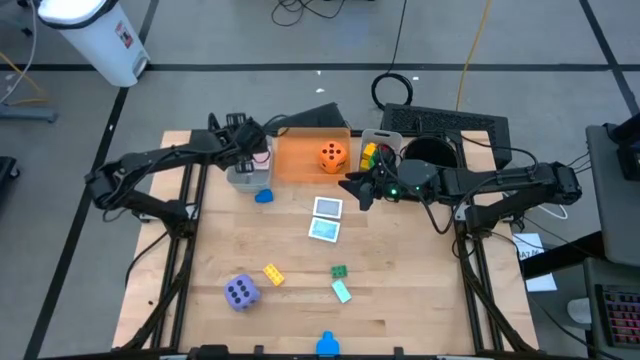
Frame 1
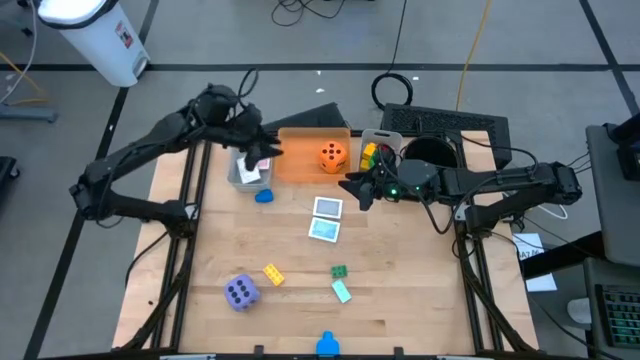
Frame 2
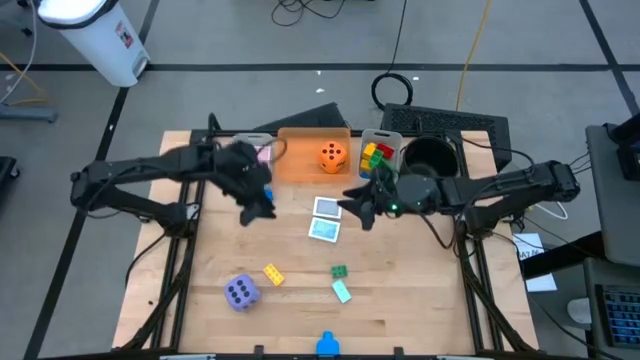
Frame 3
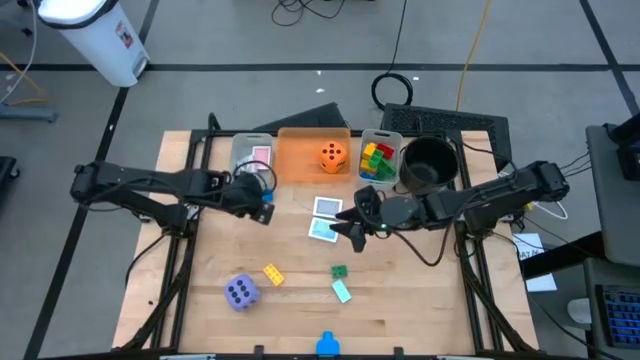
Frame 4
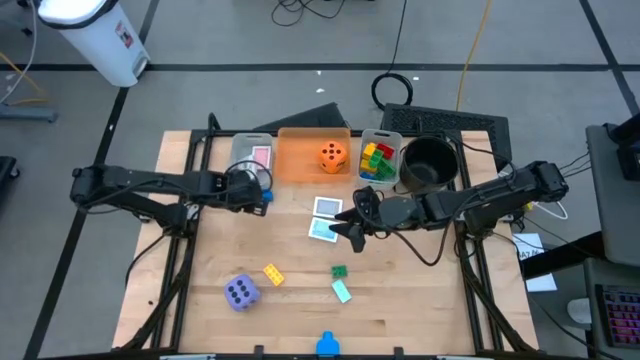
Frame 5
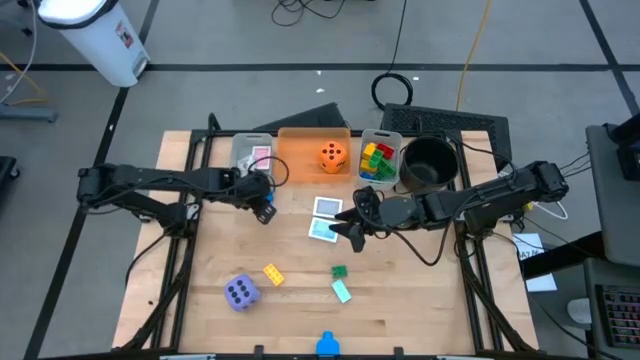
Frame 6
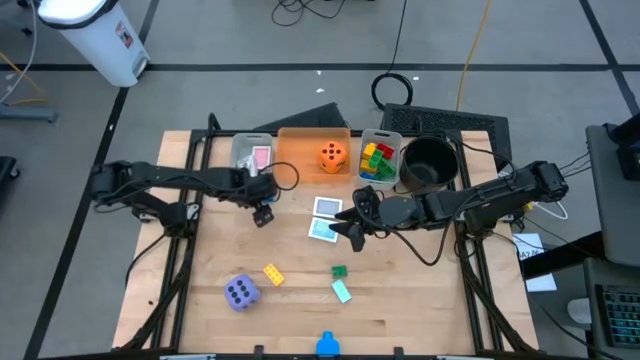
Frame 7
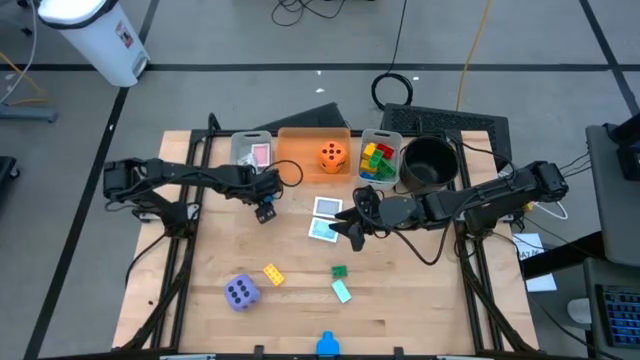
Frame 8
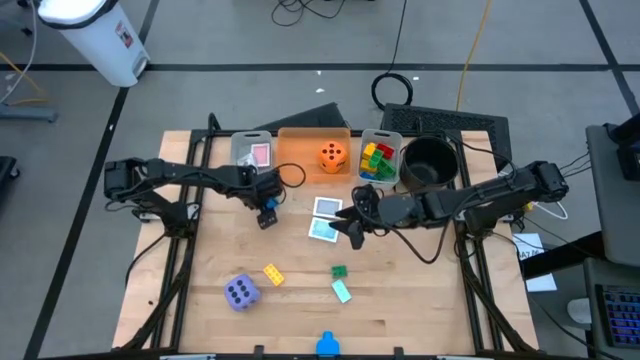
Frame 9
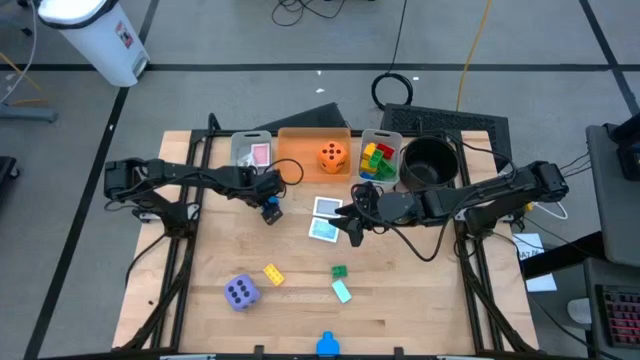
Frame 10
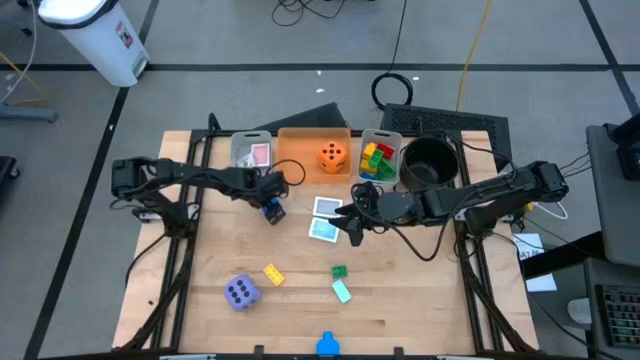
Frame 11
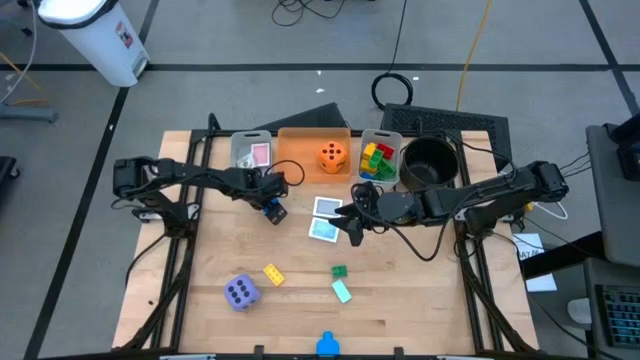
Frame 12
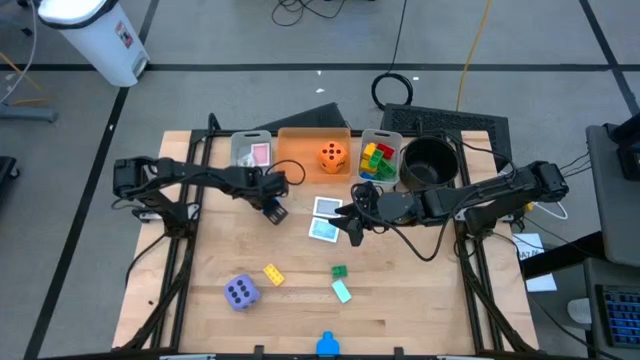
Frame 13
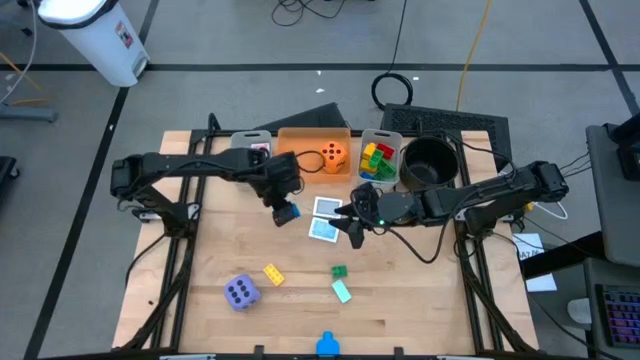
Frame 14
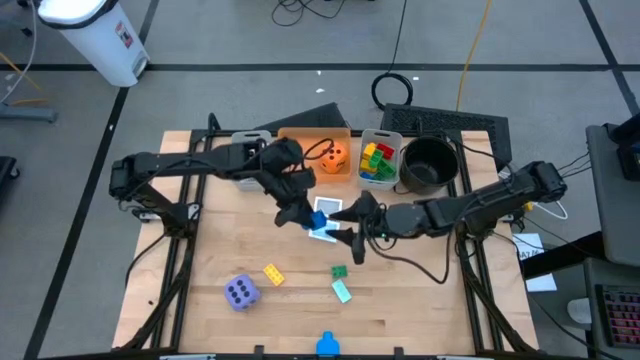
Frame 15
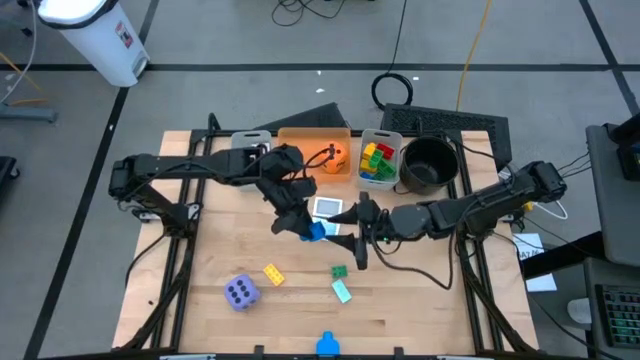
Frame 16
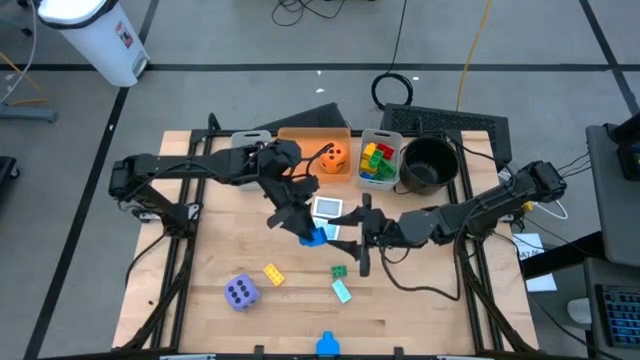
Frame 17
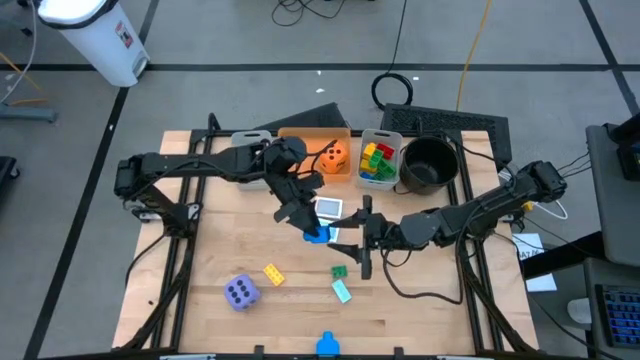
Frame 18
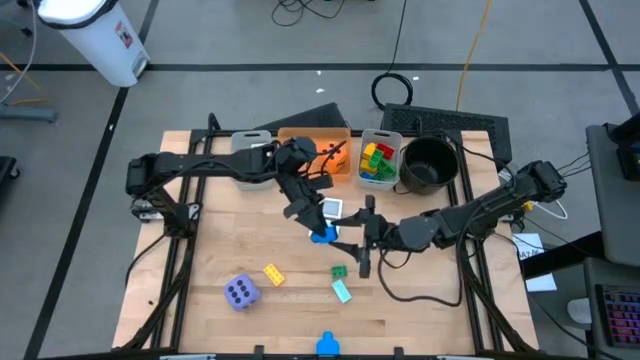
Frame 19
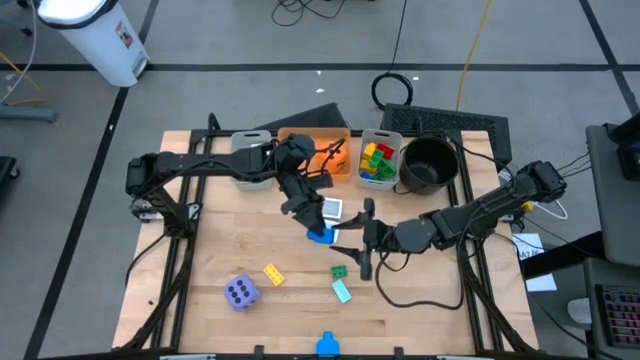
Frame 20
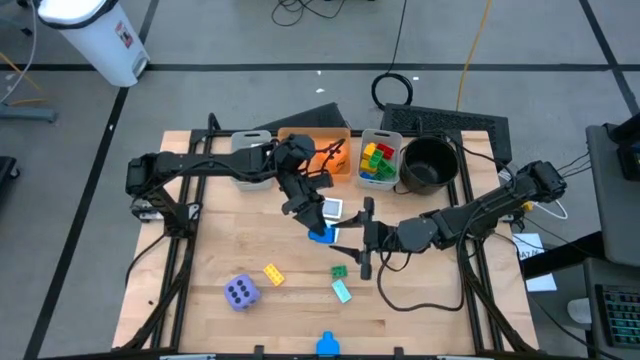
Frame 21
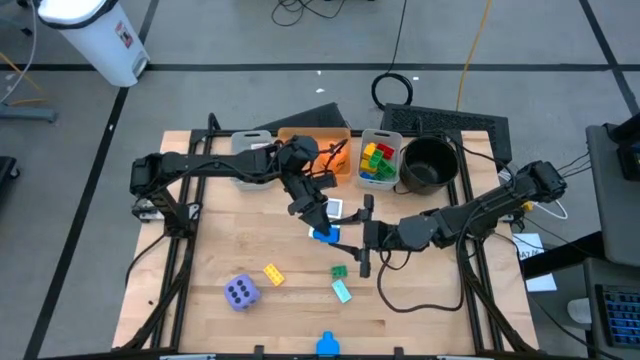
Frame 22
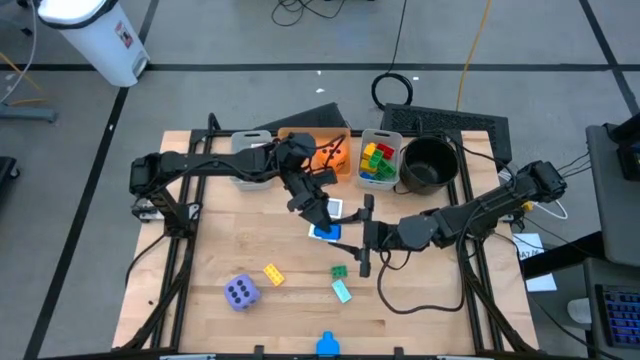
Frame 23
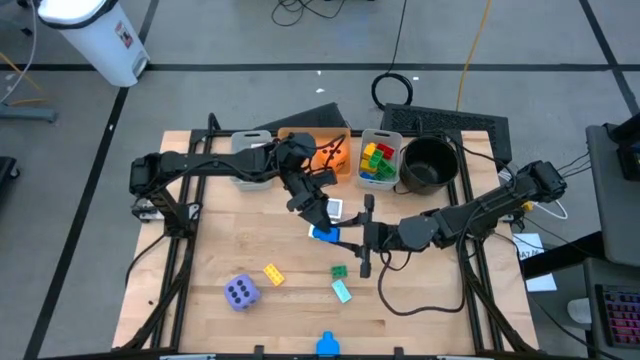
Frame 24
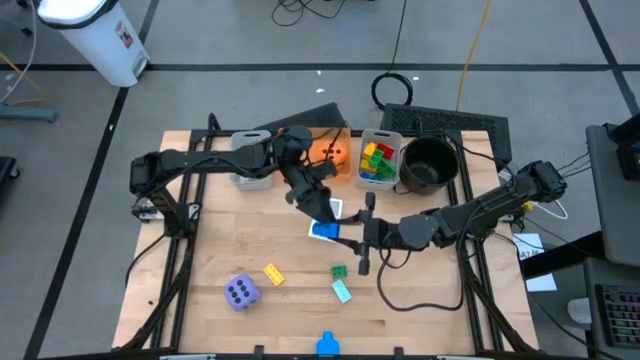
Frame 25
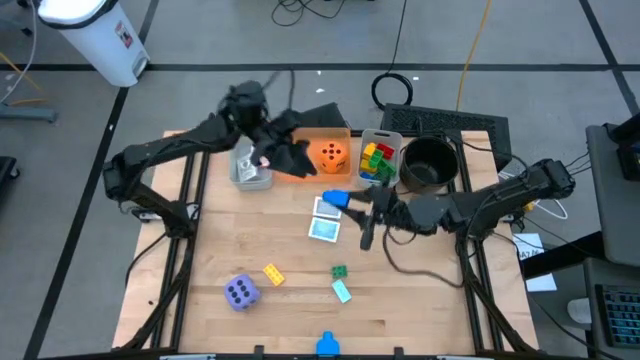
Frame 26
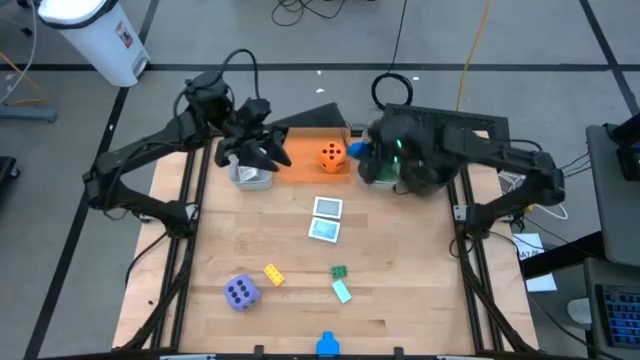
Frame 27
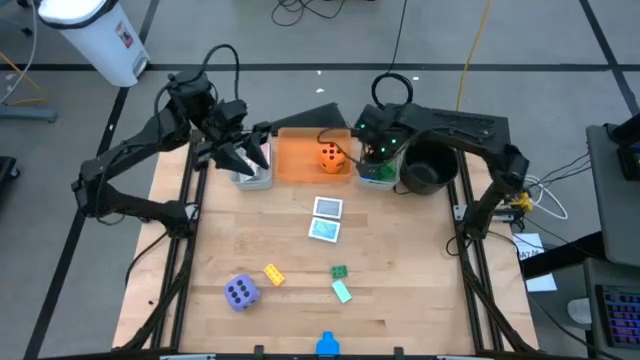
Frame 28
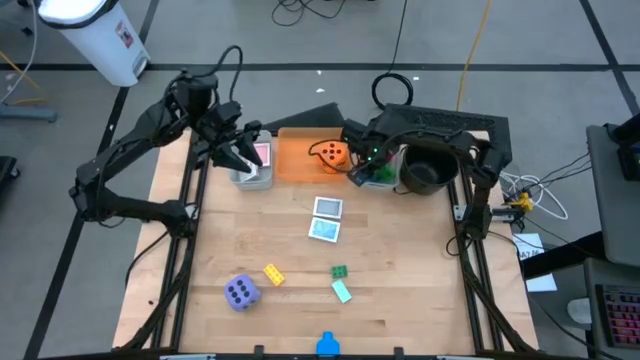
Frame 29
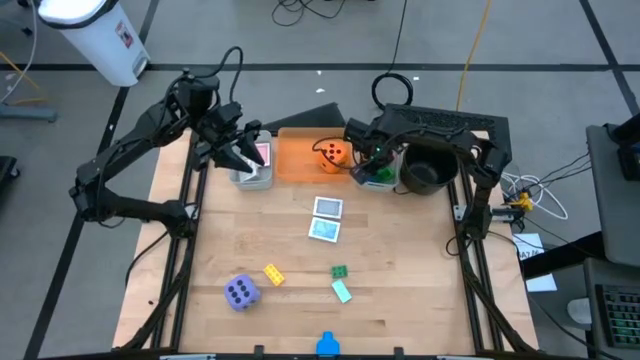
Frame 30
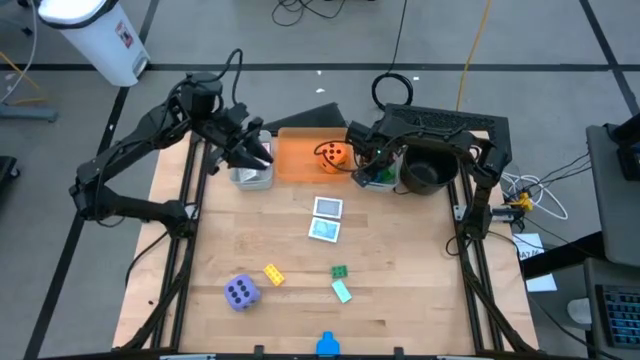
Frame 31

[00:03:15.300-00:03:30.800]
Task: Pick & Place Toys
Put the blue game piece into the right gray bin

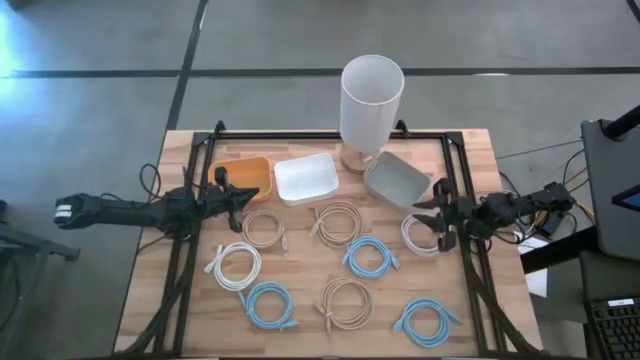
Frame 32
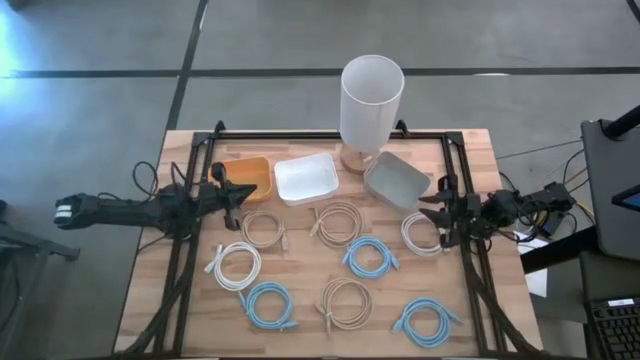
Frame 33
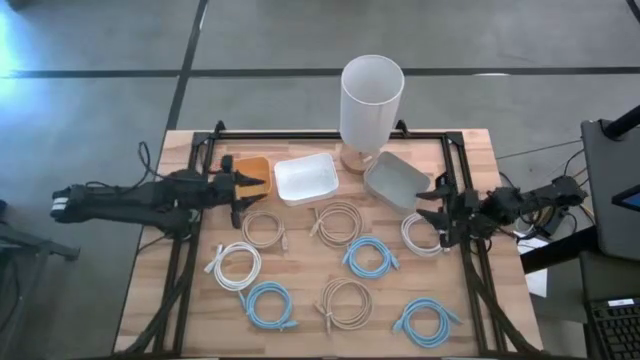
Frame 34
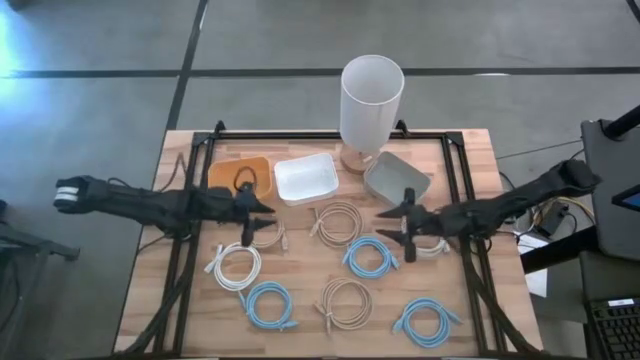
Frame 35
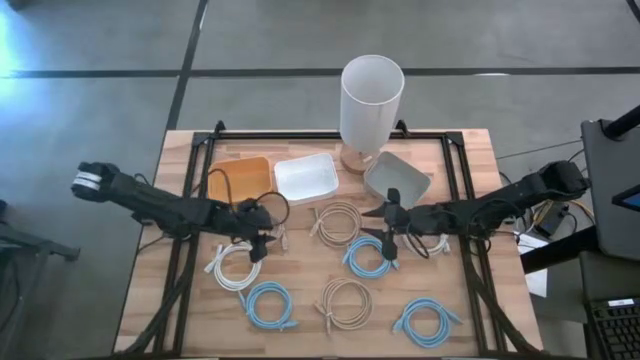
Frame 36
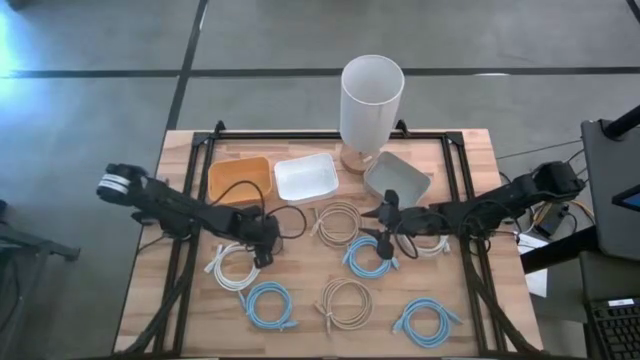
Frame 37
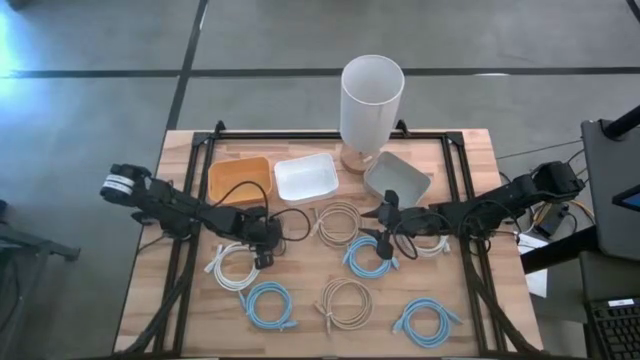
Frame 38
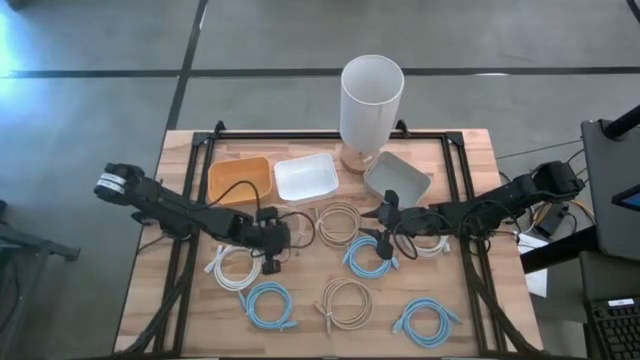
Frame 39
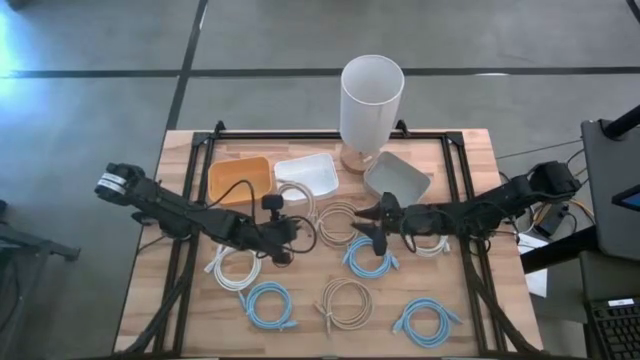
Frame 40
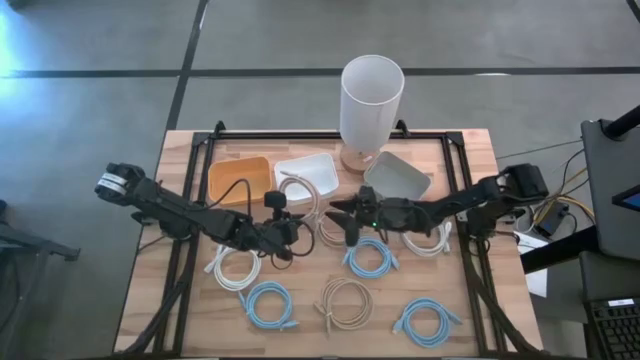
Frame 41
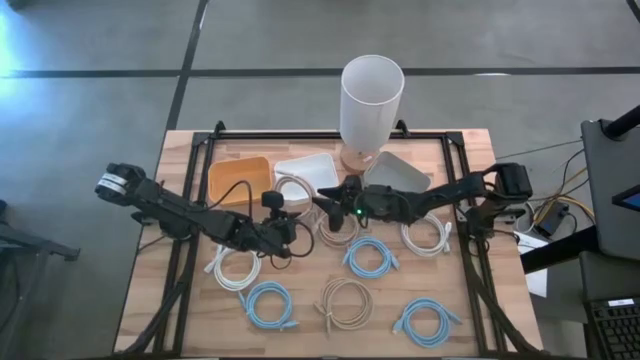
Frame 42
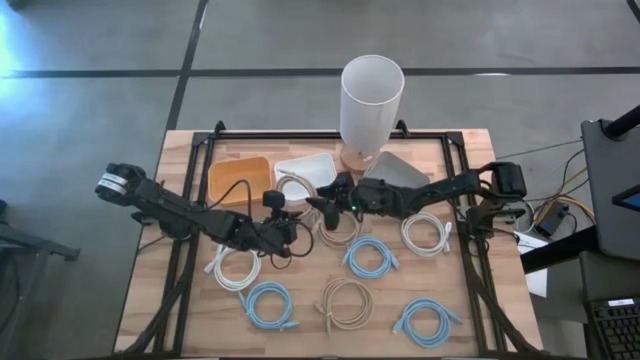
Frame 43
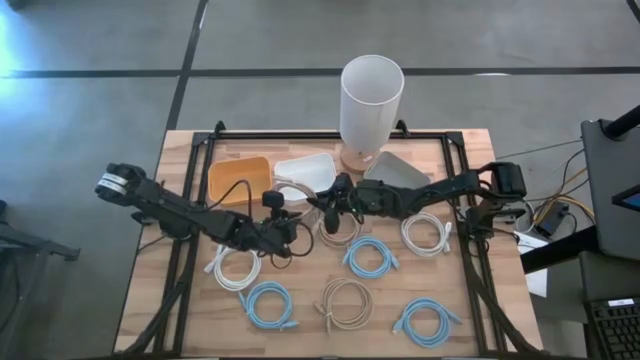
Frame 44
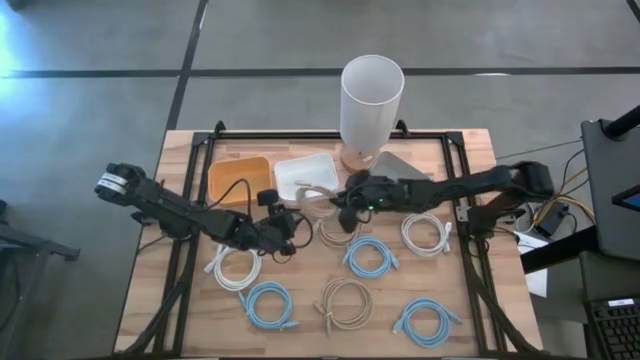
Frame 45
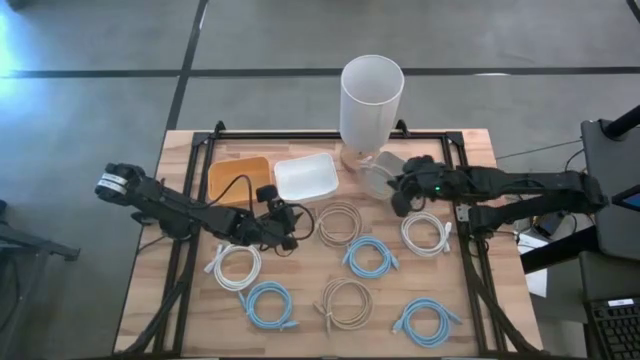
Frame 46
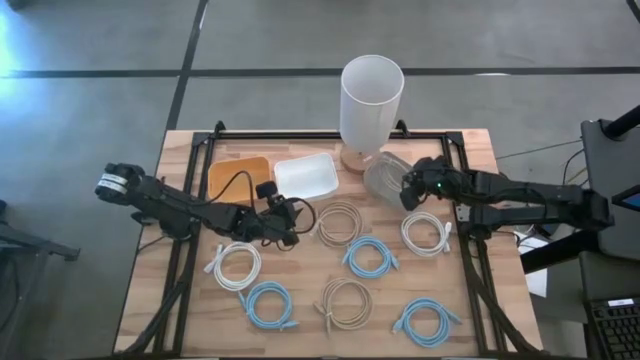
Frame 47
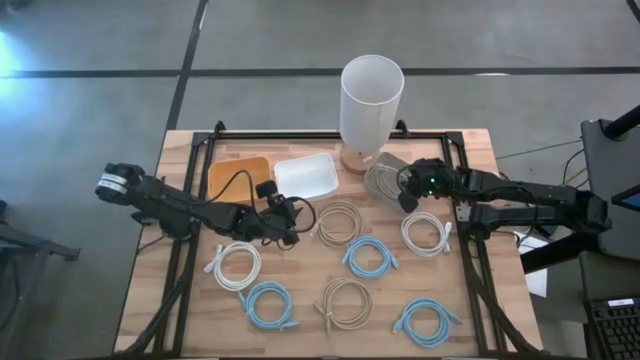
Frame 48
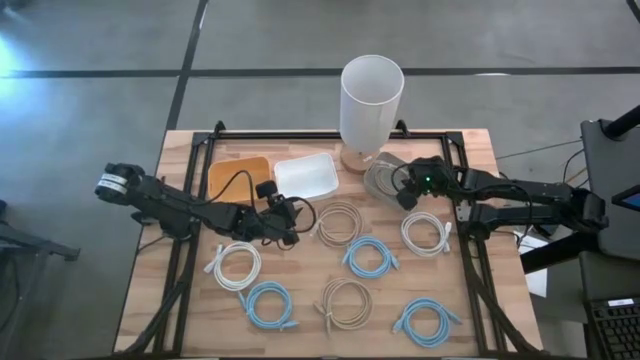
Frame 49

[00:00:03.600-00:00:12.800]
Task: Pick & Place USB Port
Put the left brown USB cable into the gray bin
